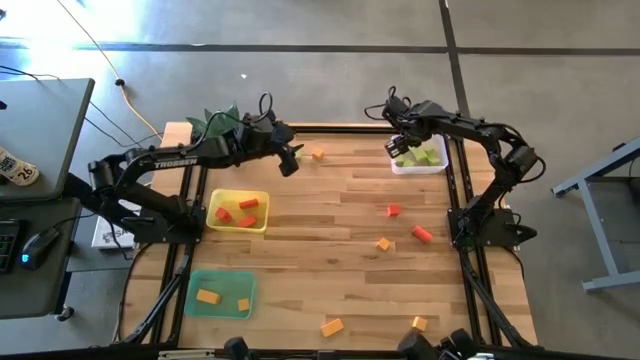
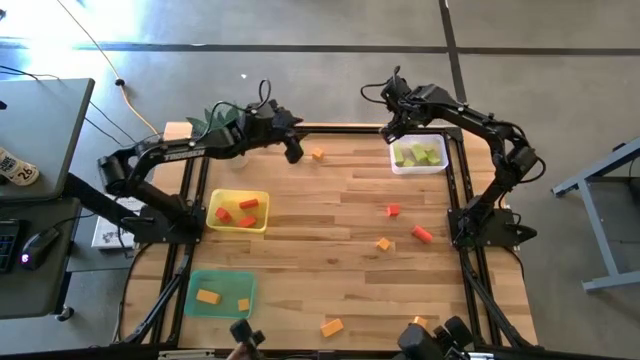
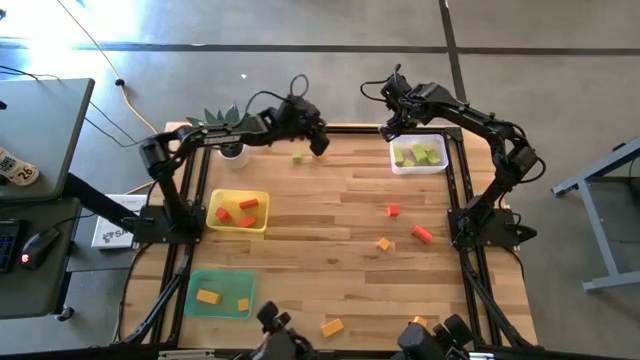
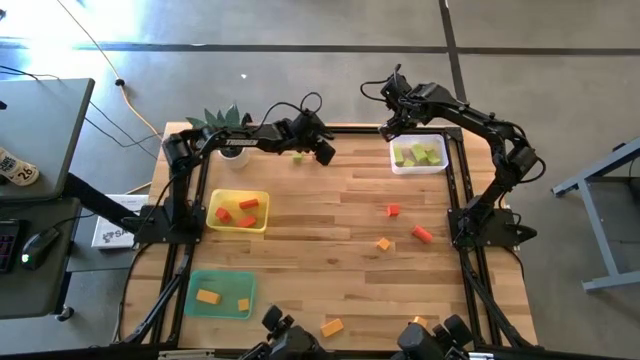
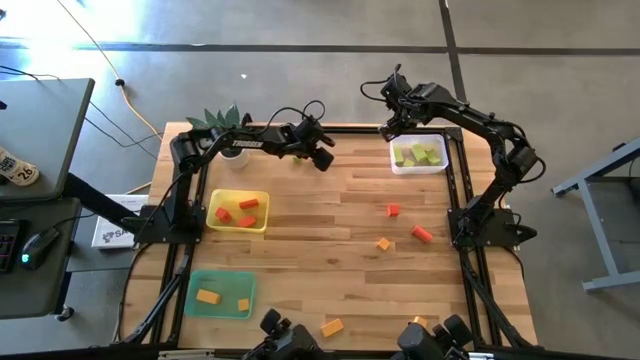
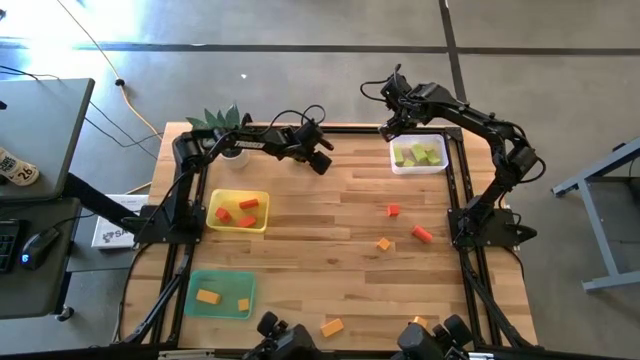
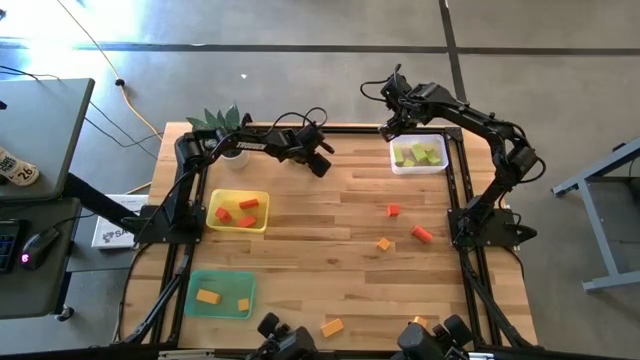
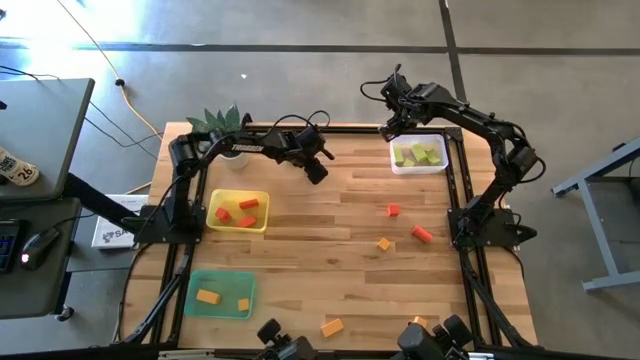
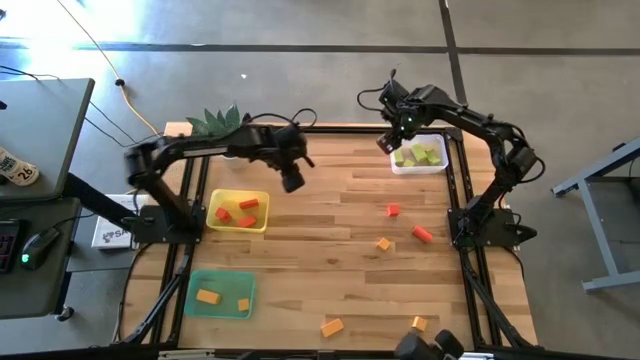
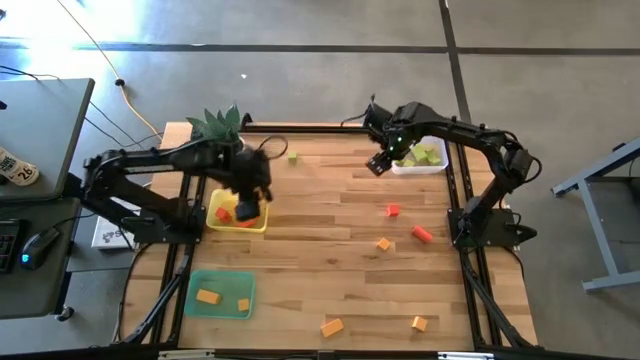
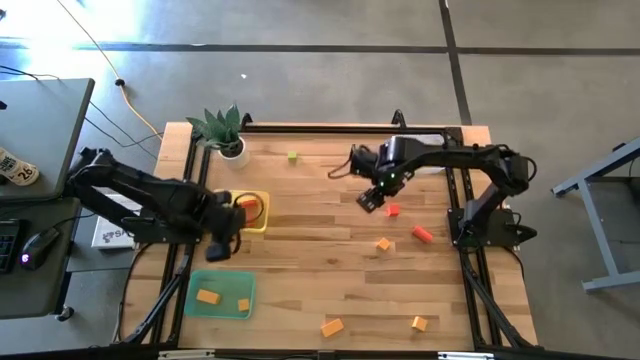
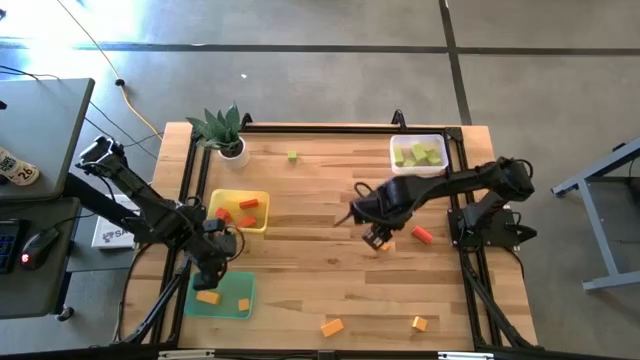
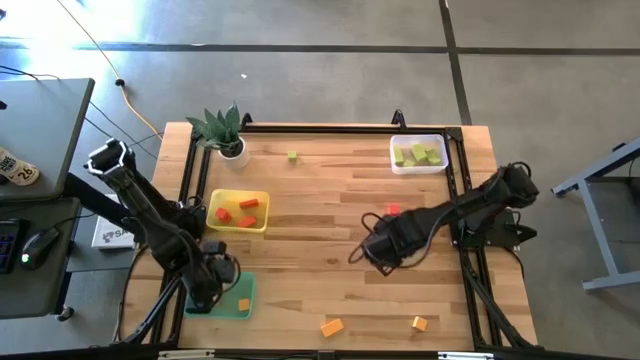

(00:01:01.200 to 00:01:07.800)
Task: Sort & place blocks by color
Put the yellow block into the green bin

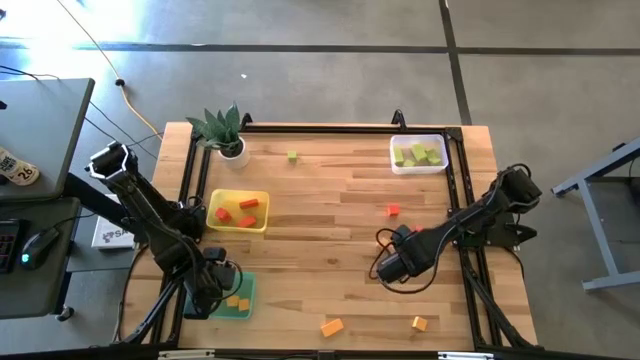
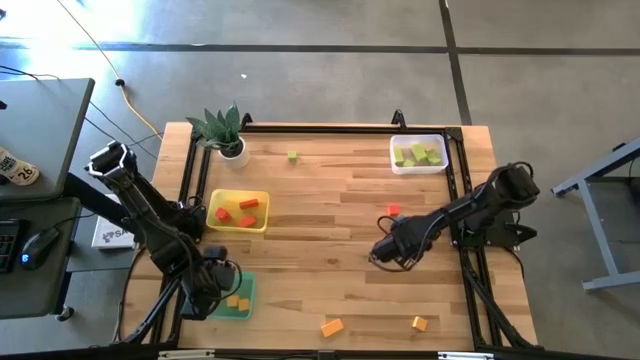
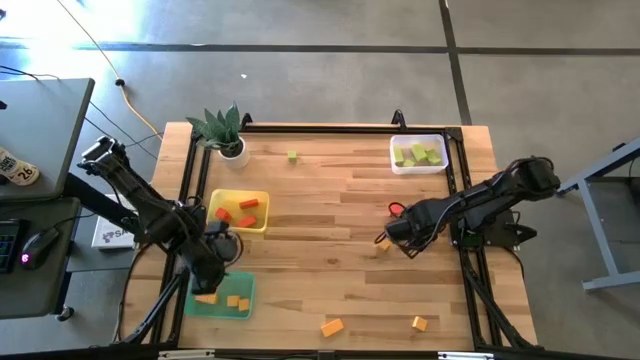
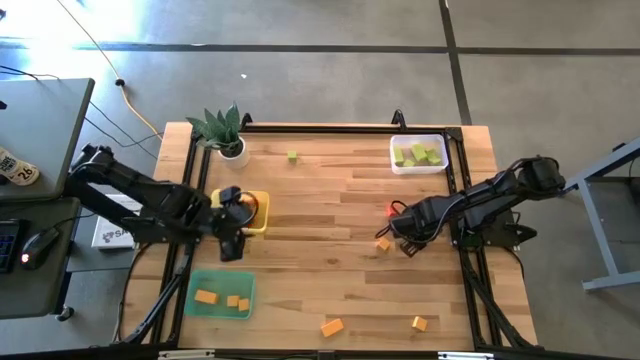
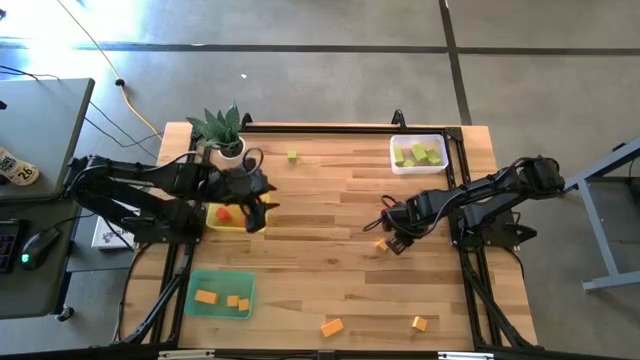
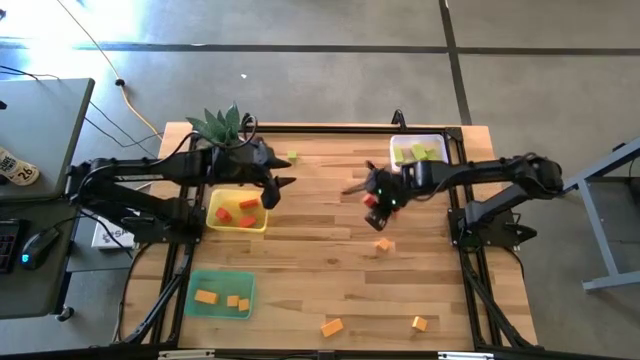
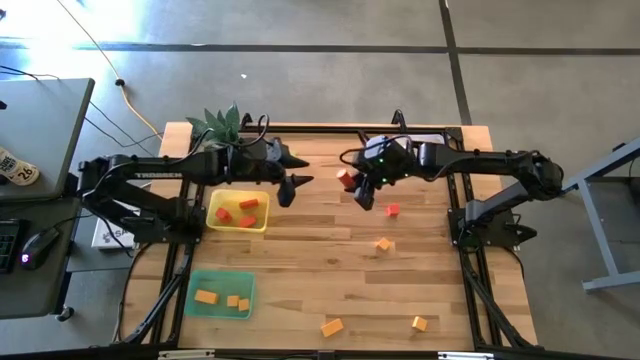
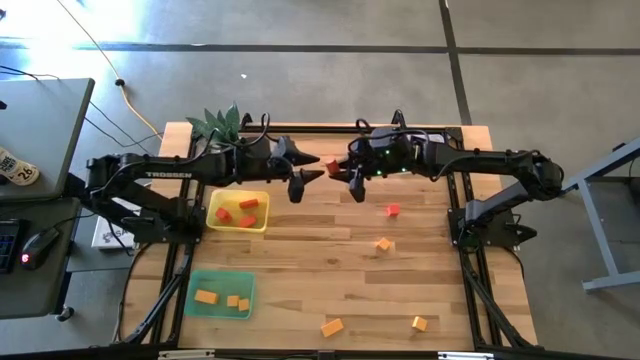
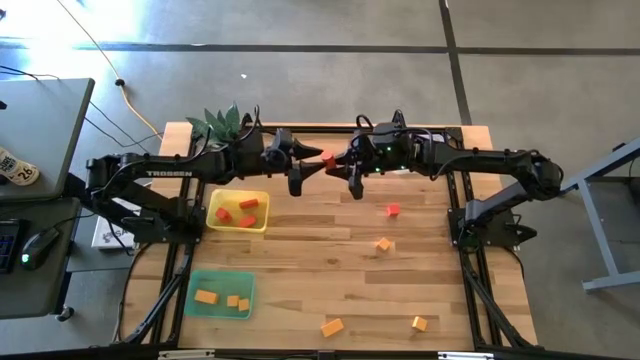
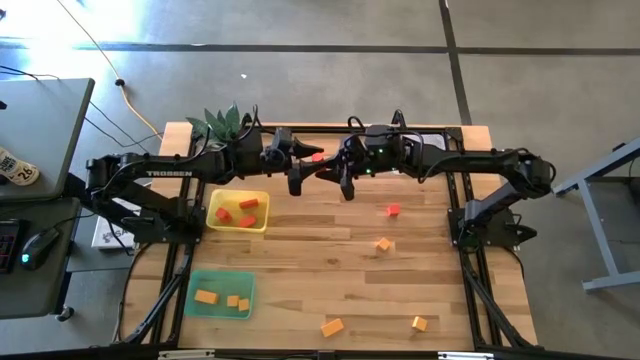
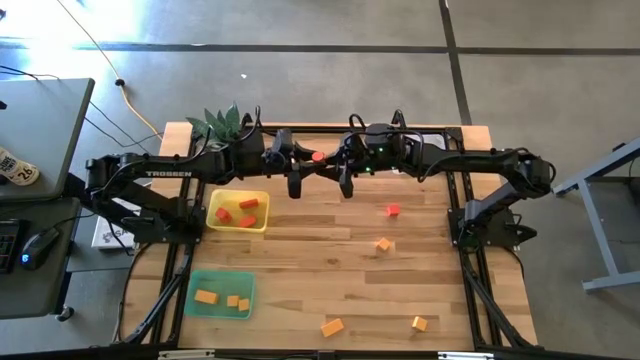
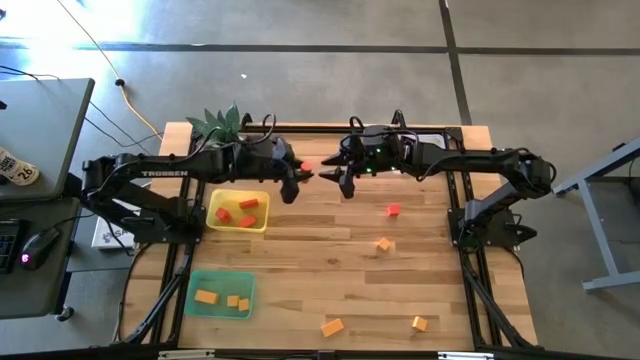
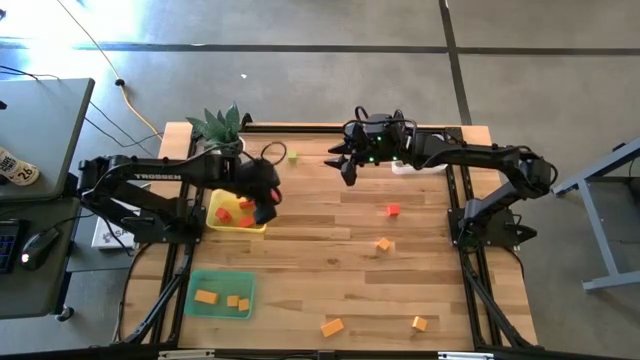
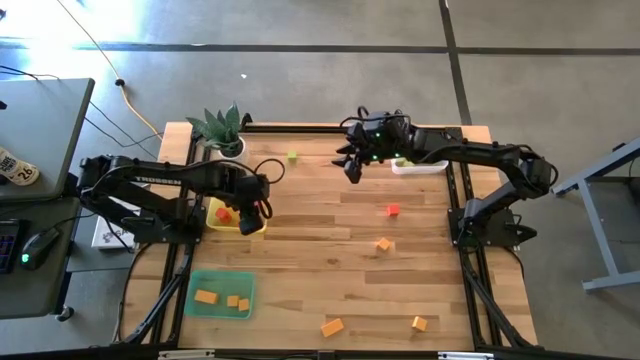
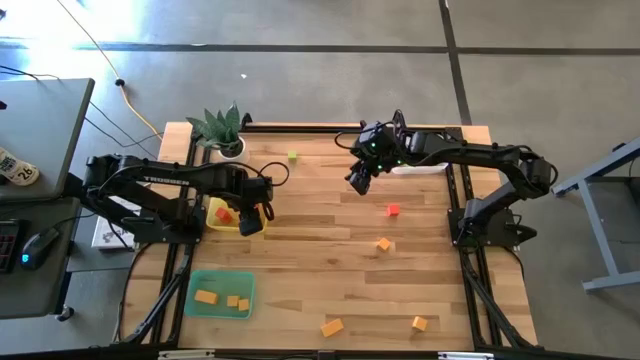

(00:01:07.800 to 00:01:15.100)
Put the orange block into the yellow bin

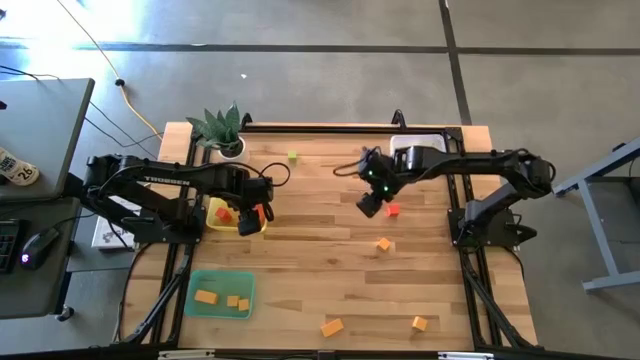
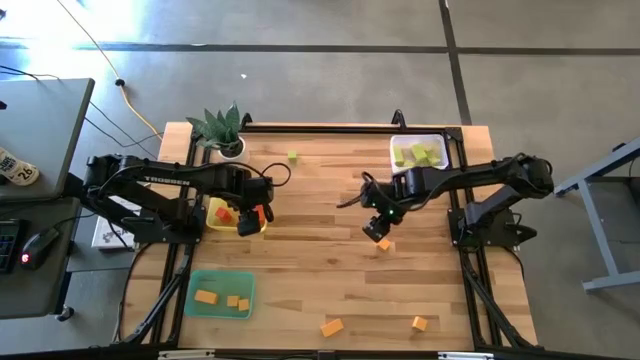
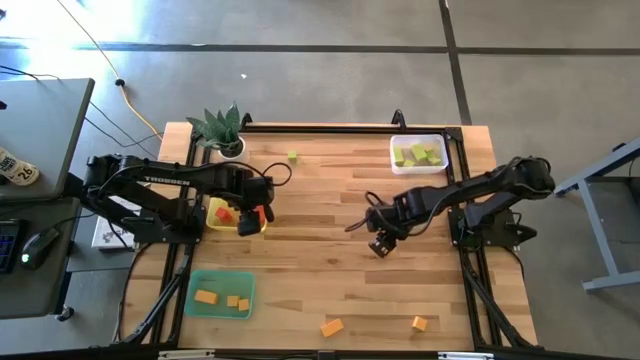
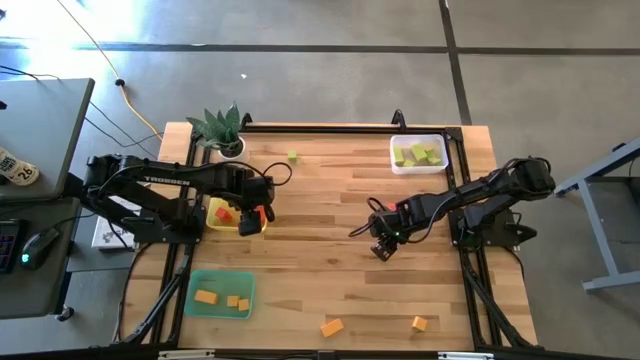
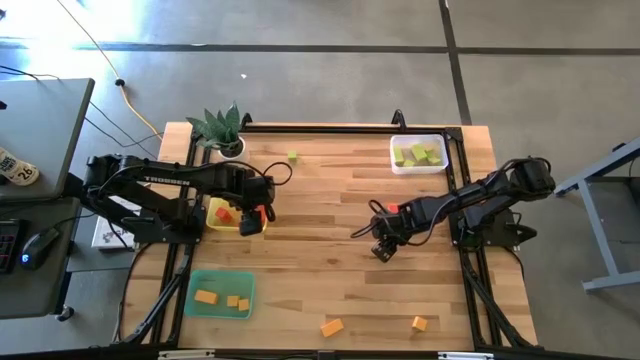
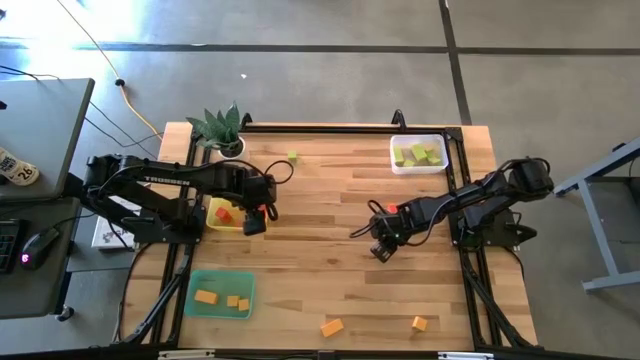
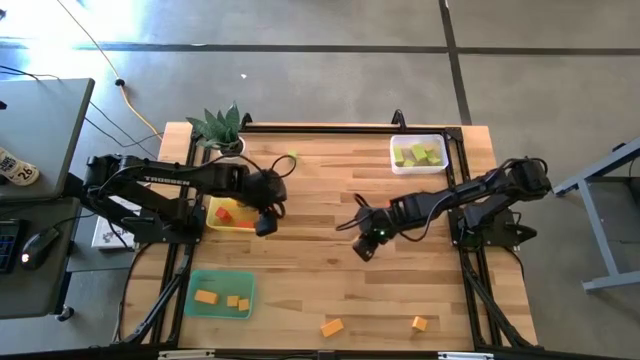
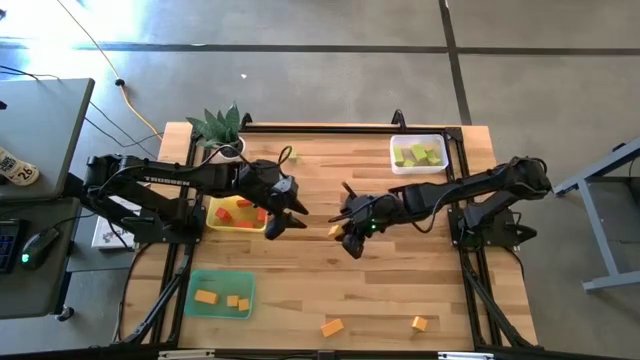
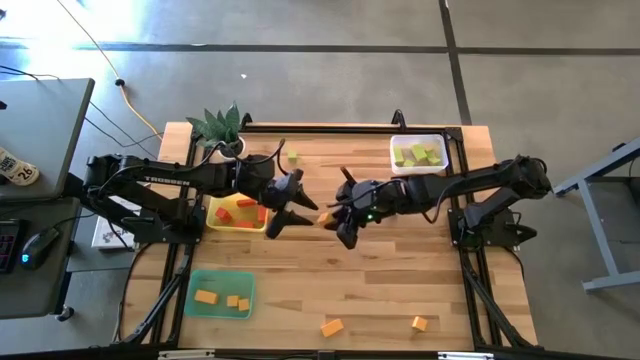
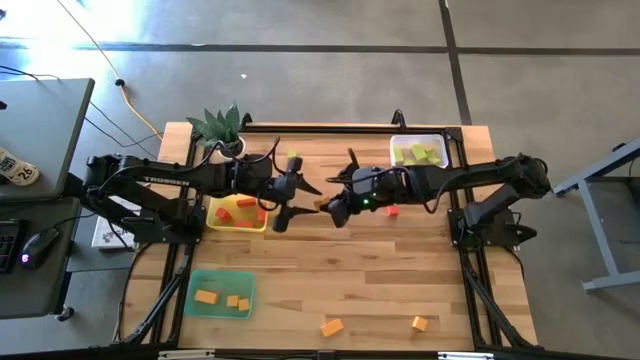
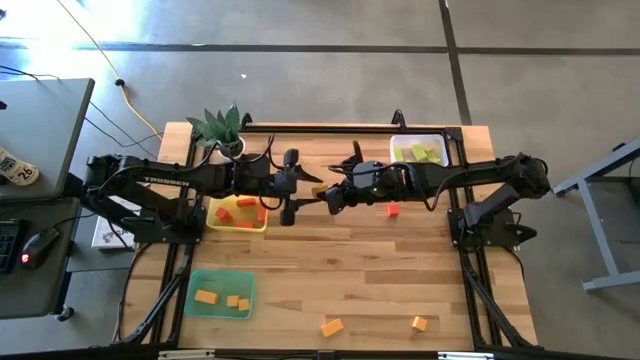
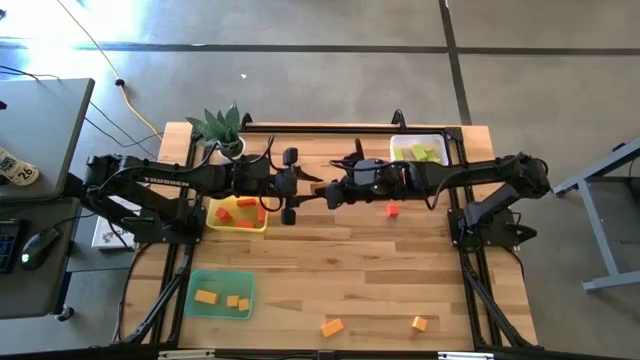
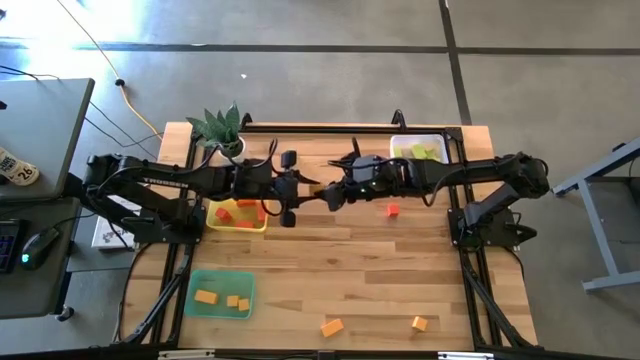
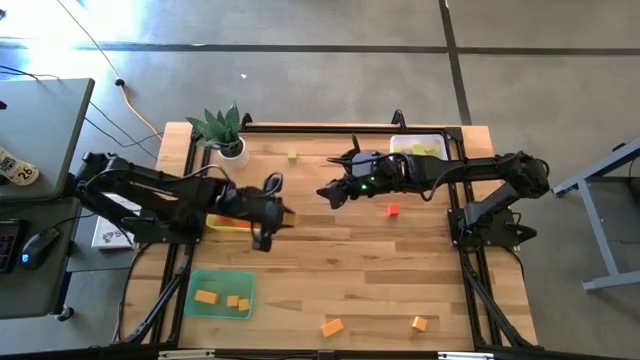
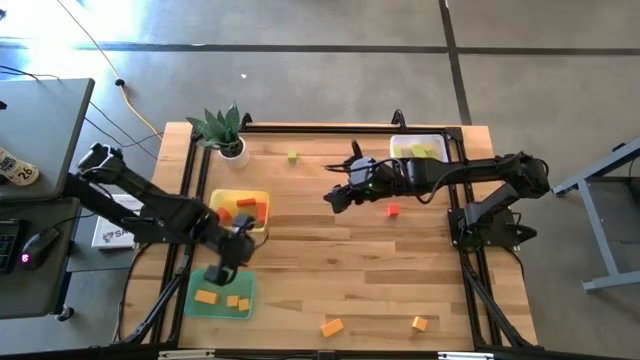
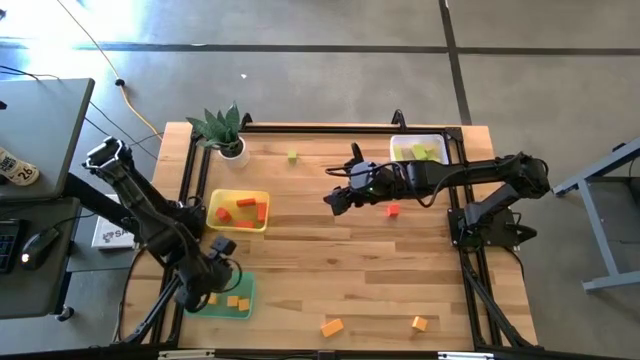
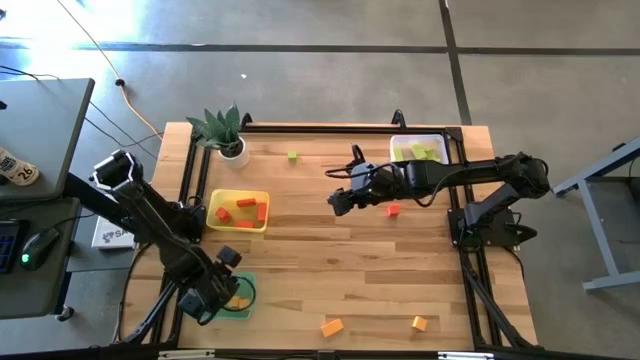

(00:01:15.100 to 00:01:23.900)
Put the yellow block into the green bin
